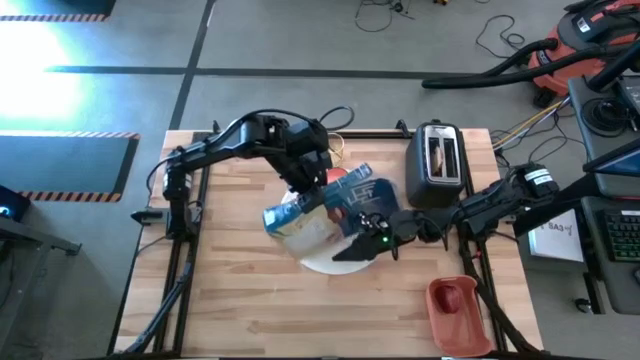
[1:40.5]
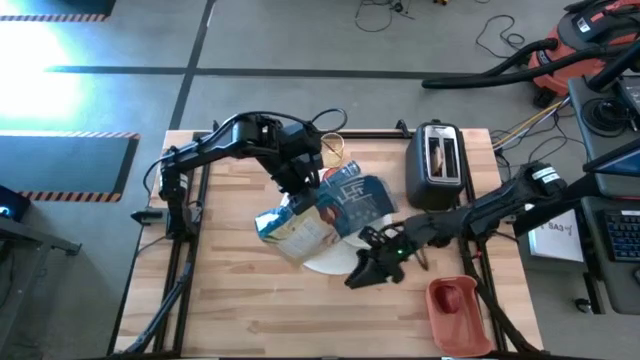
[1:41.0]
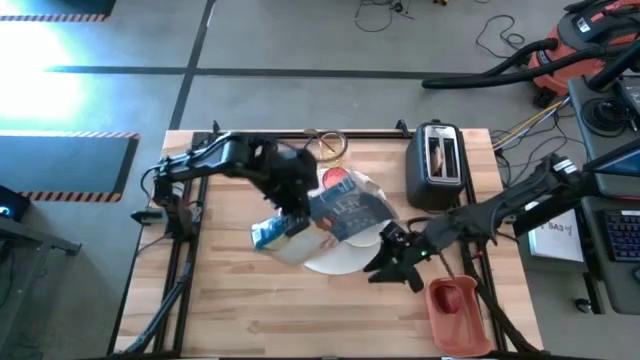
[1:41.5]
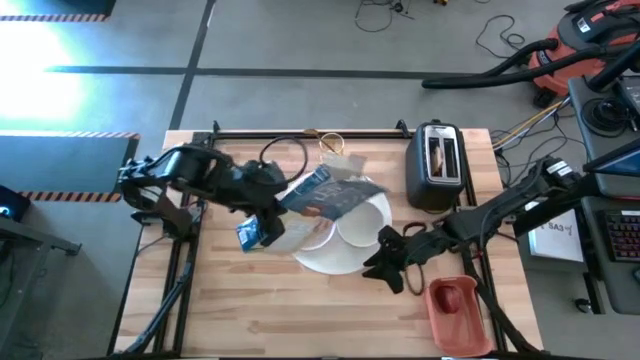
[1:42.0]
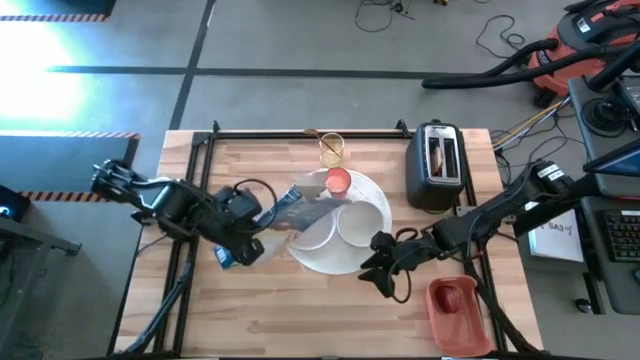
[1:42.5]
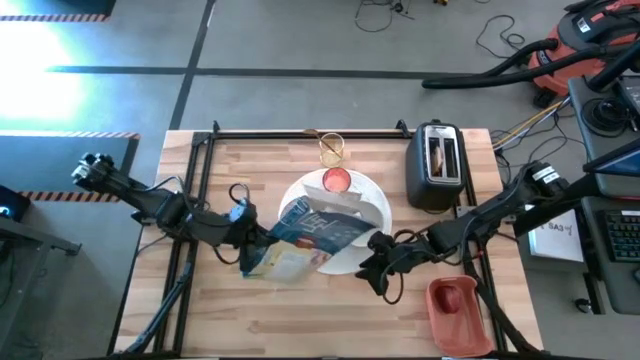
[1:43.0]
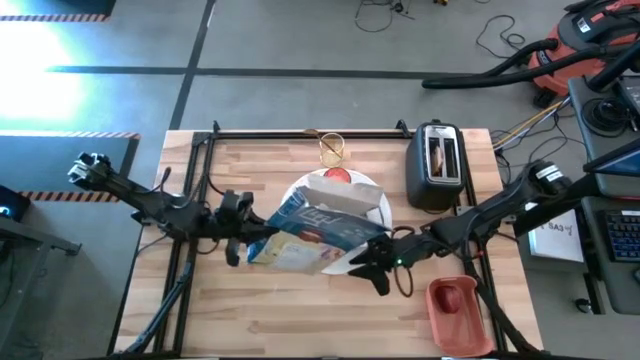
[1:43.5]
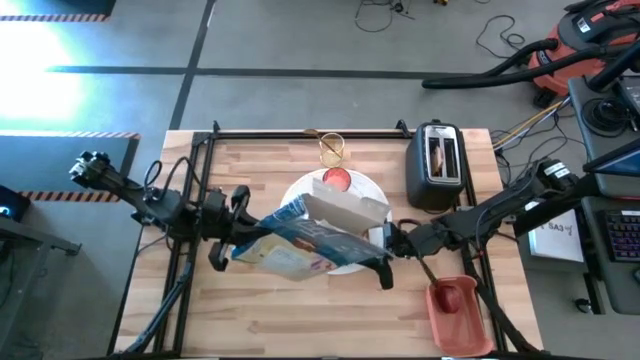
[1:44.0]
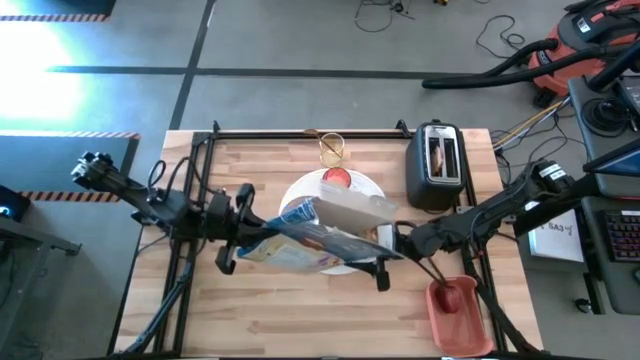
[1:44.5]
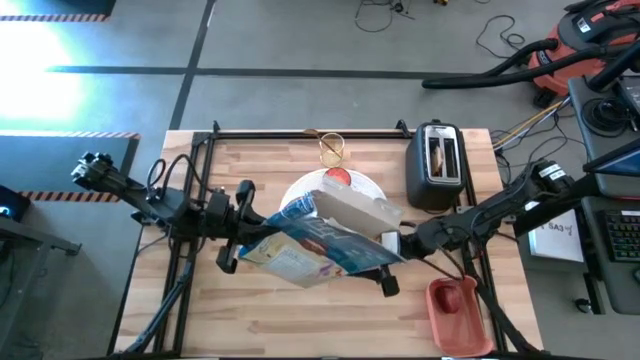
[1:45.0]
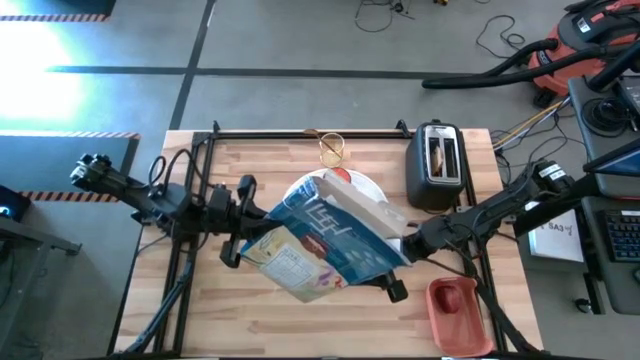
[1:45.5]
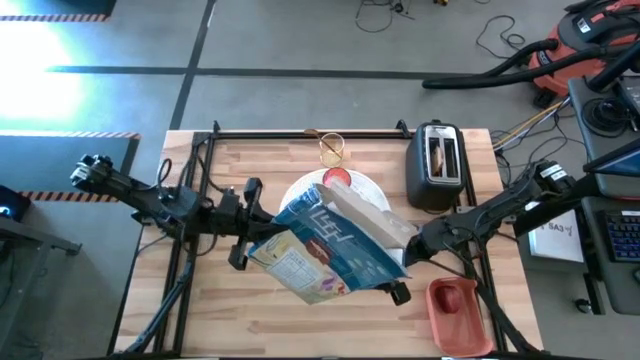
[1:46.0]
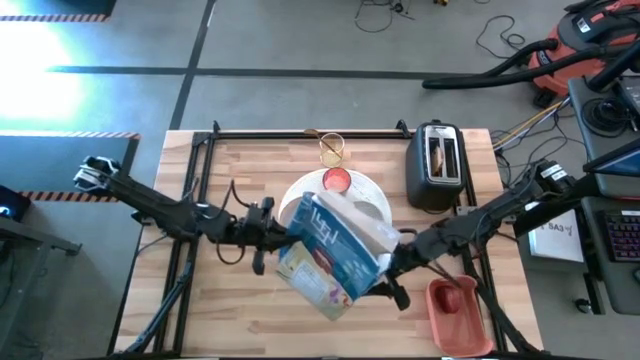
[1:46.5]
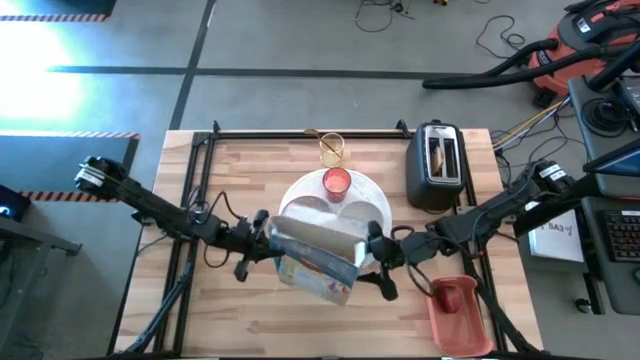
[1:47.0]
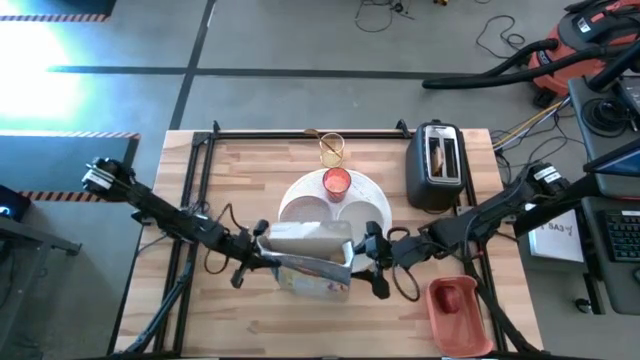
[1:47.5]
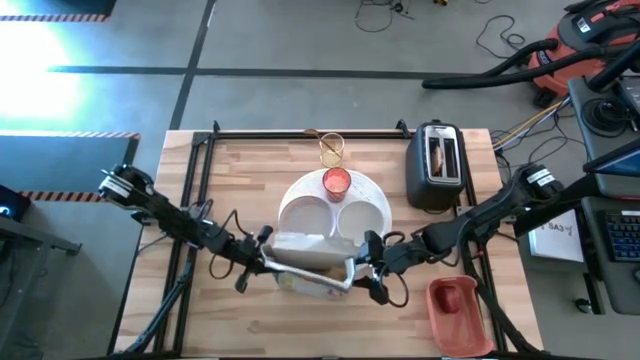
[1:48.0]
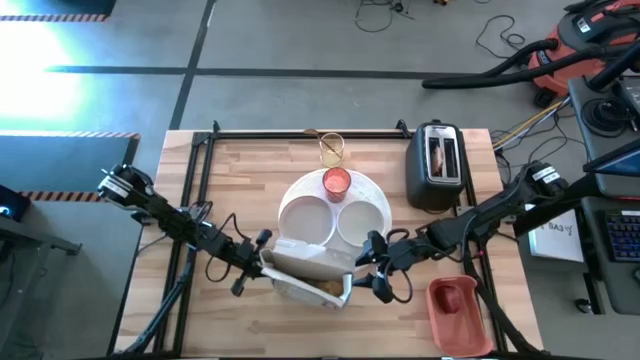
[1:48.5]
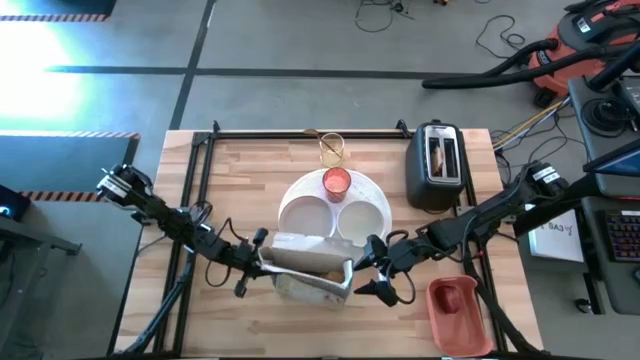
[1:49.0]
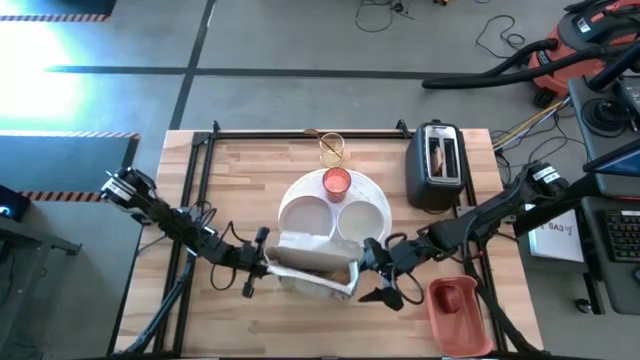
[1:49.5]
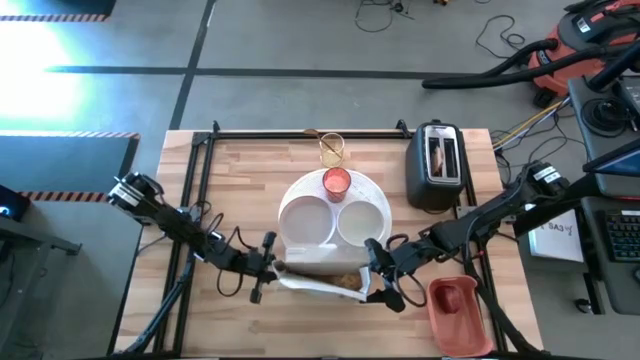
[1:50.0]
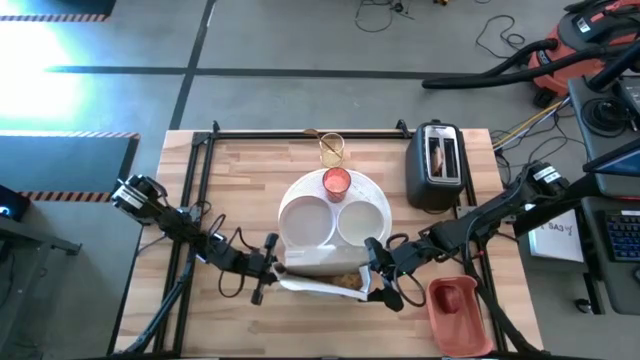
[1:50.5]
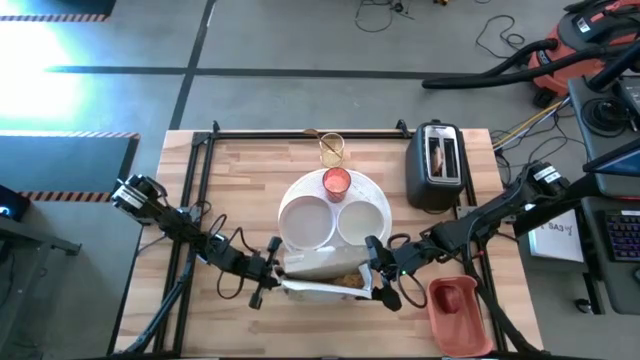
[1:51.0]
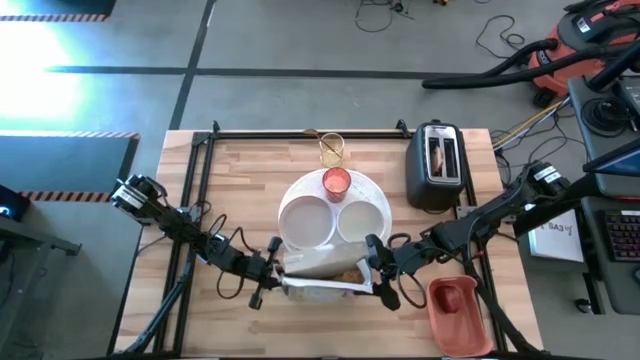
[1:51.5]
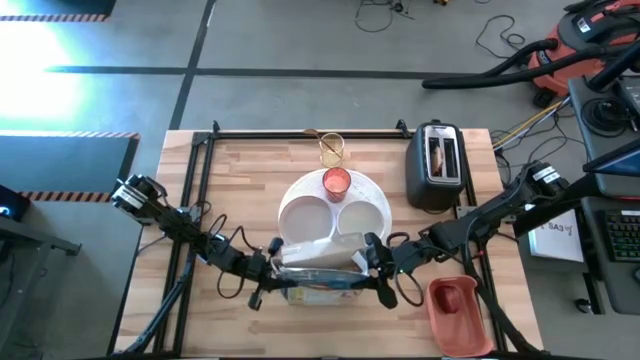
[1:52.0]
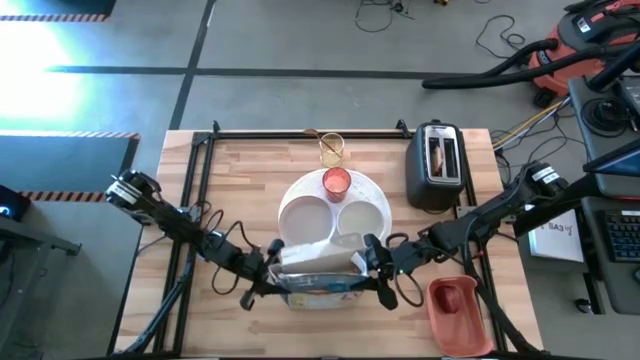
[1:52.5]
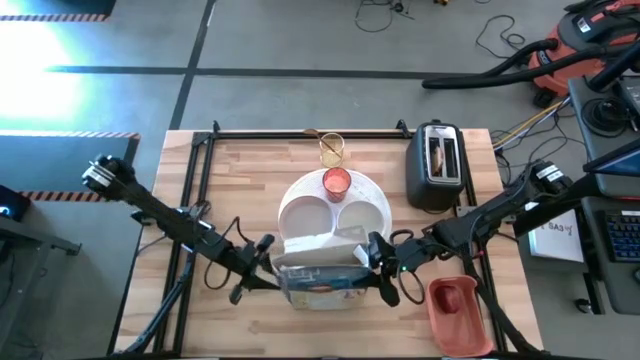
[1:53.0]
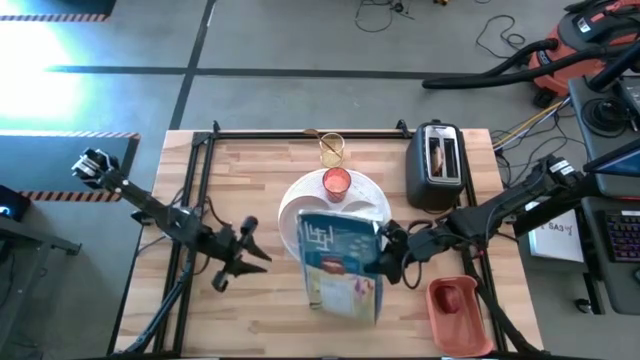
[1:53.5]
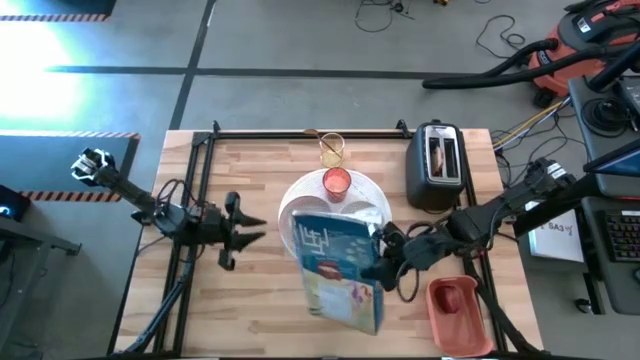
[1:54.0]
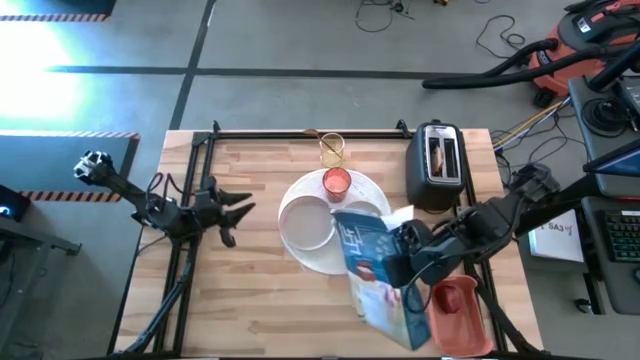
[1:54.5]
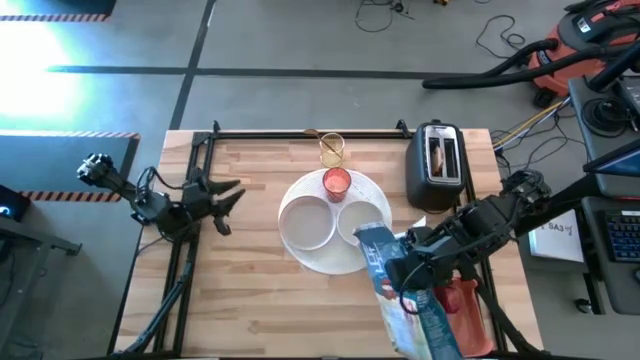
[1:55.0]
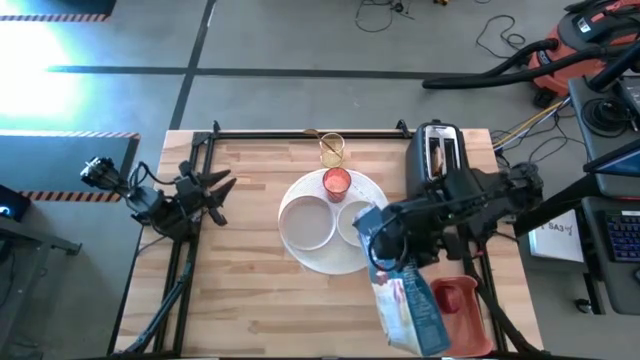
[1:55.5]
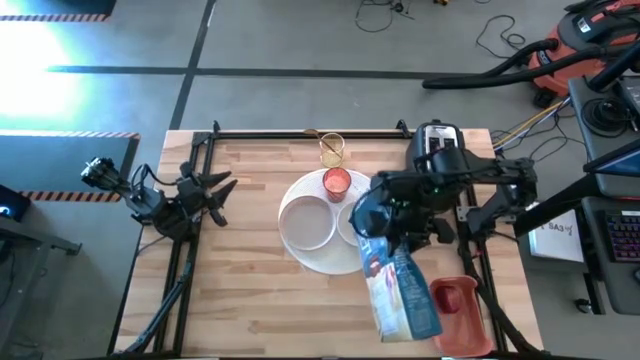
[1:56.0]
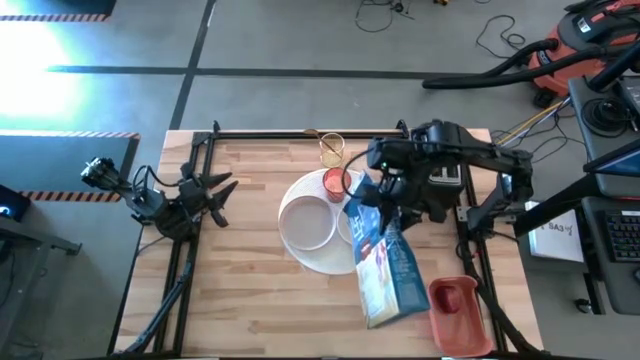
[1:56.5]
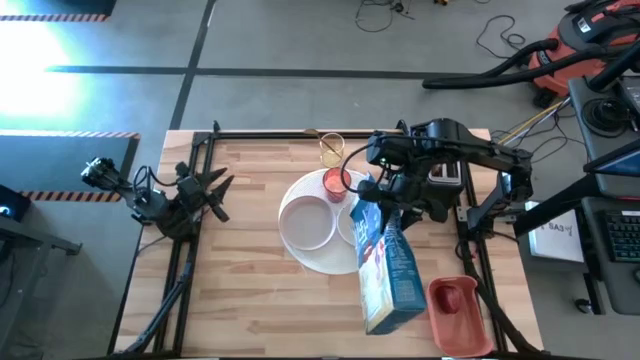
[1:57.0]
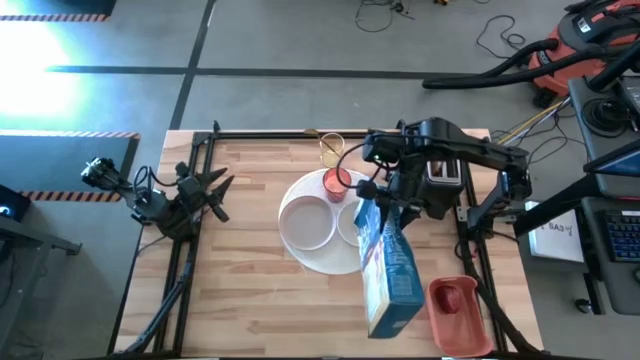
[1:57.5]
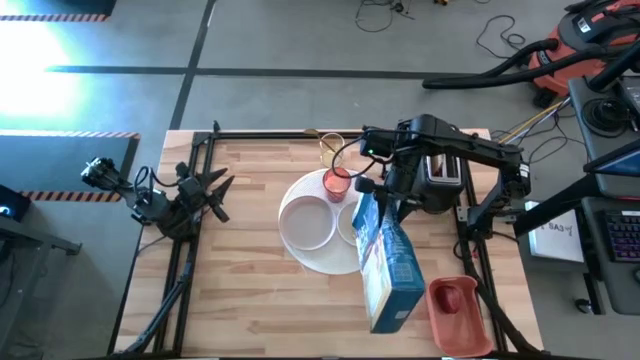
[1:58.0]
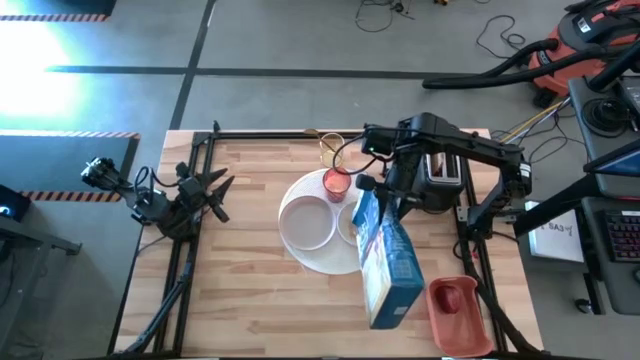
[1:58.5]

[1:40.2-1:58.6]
Task: Arrange a breakfast setting
Pour the cereal from the cereal box into the white bowl

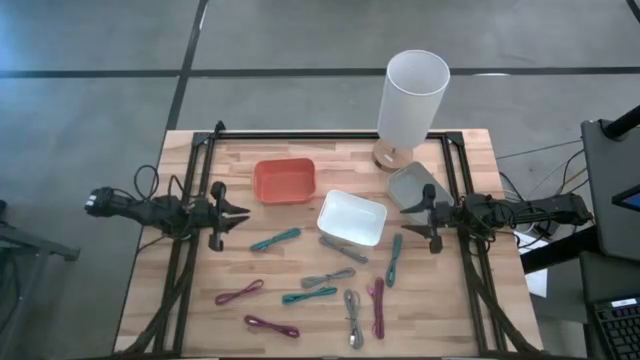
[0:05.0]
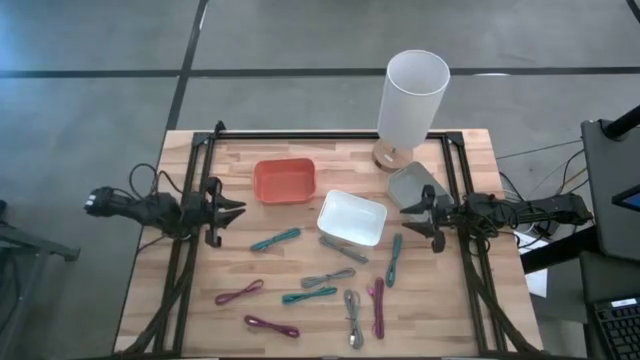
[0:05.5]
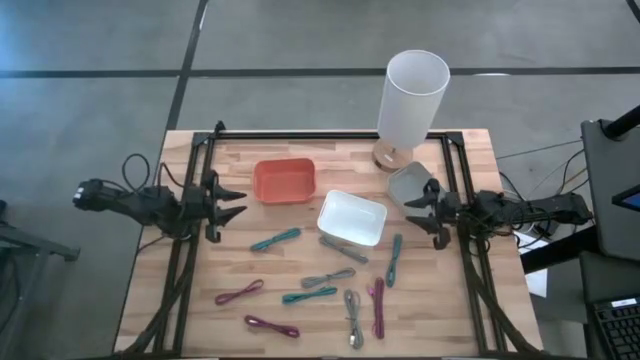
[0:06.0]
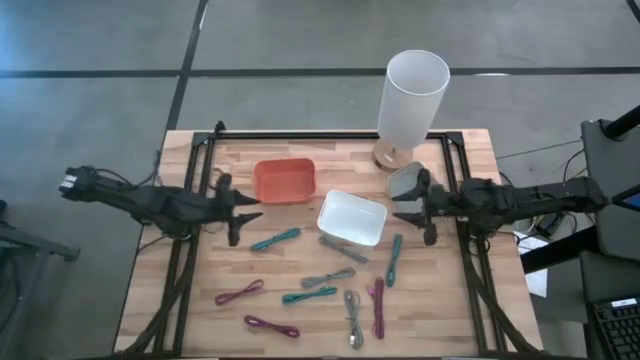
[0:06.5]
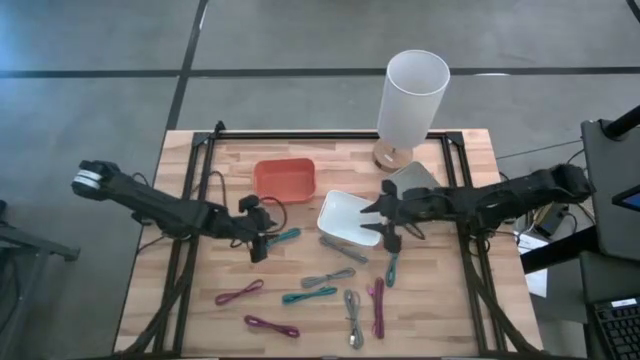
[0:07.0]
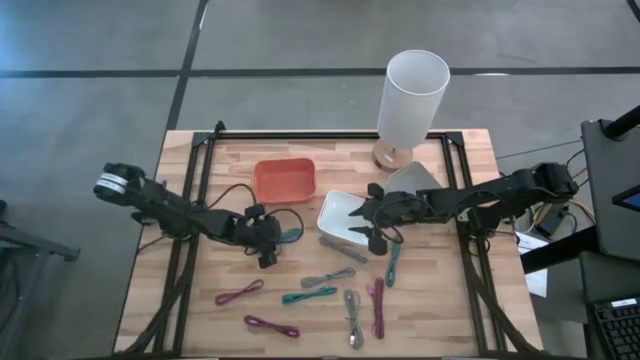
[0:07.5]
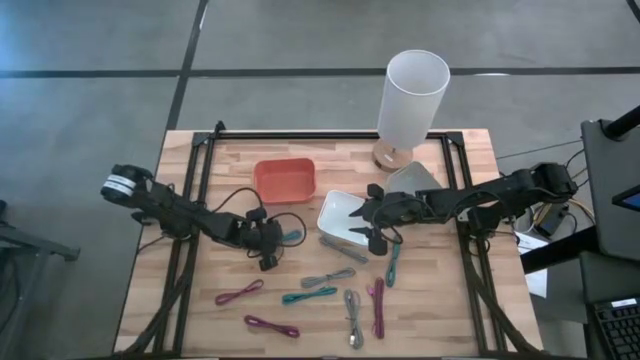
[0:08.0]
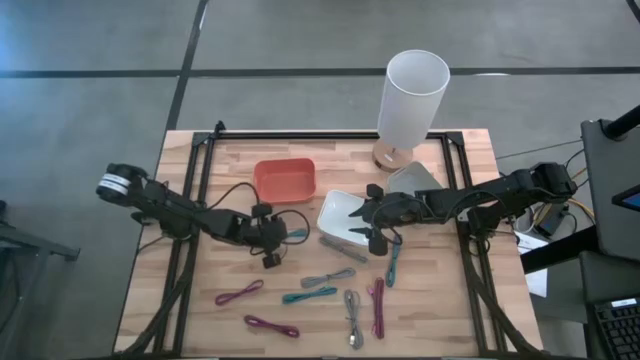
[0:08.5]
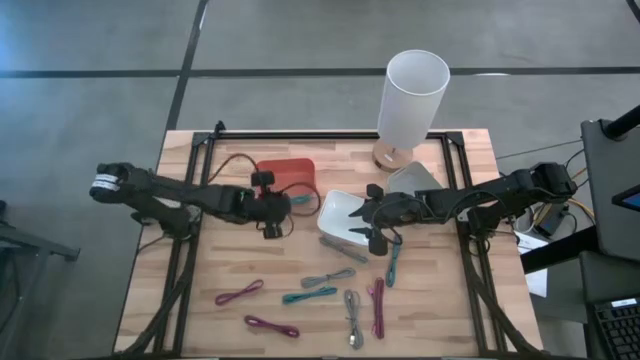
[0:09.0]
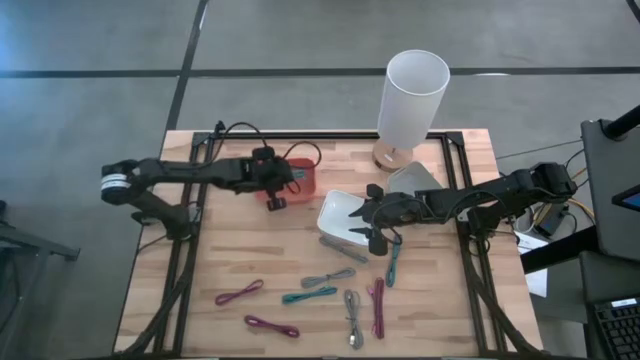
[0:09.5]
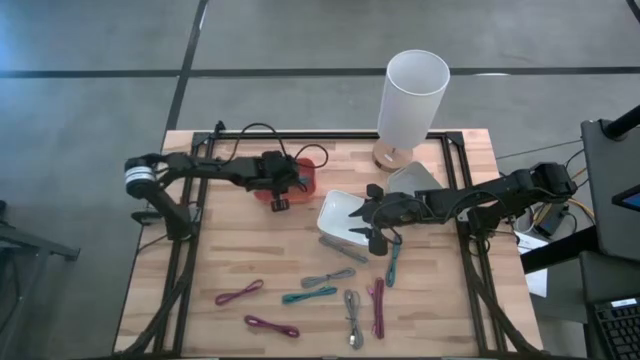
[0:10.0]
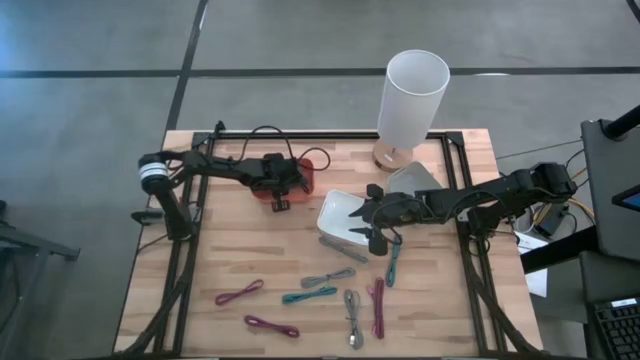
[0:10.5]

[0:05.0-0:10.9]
Task: Pick & Place USB Port
Put the top left blue charger cable into the orange bin
